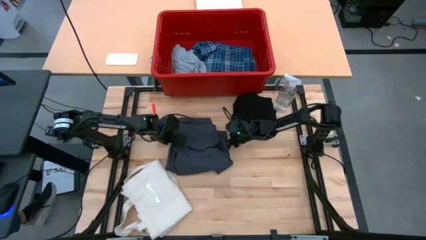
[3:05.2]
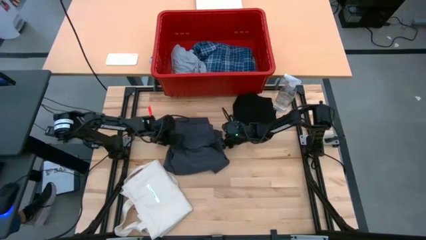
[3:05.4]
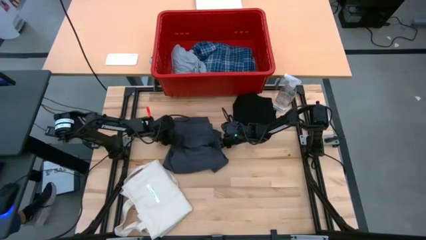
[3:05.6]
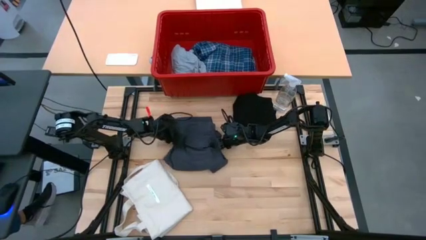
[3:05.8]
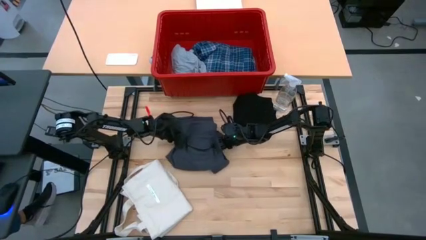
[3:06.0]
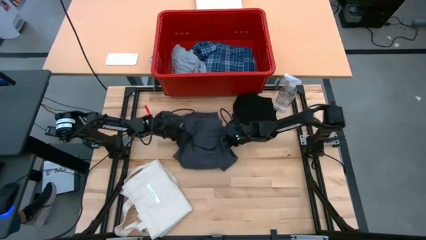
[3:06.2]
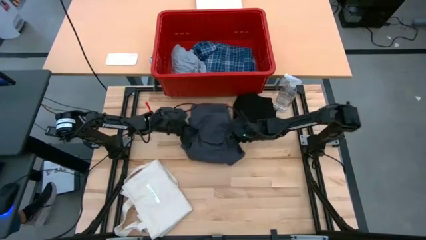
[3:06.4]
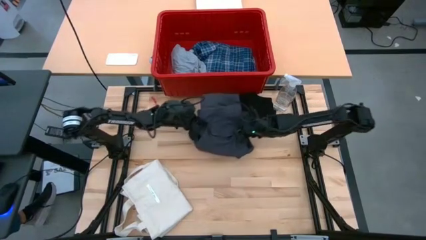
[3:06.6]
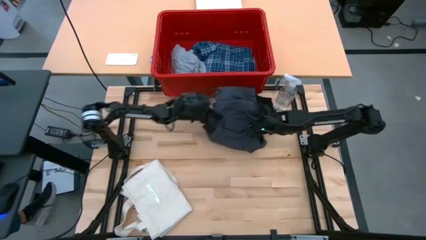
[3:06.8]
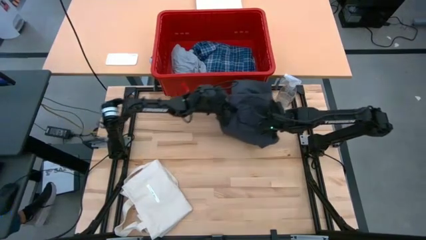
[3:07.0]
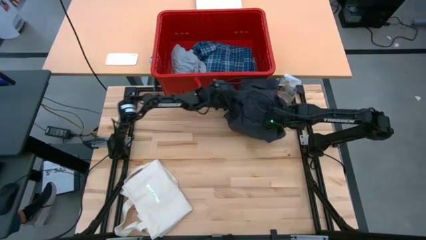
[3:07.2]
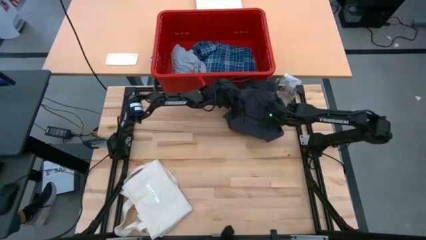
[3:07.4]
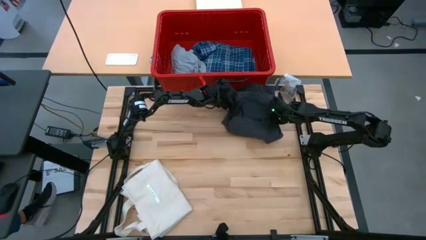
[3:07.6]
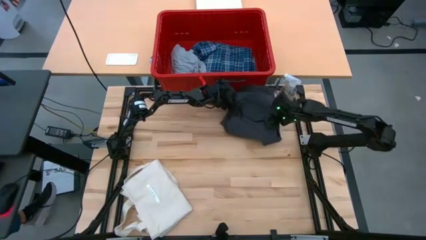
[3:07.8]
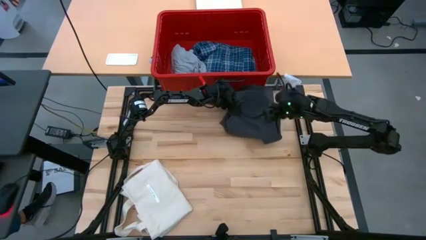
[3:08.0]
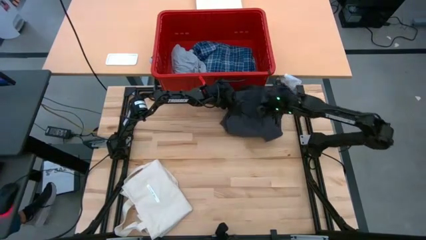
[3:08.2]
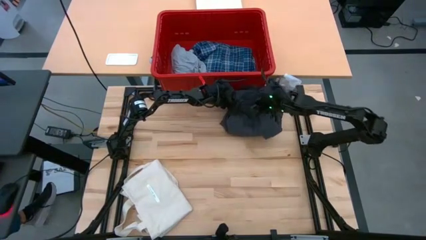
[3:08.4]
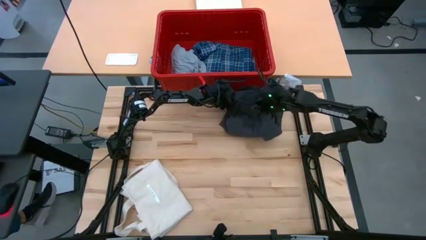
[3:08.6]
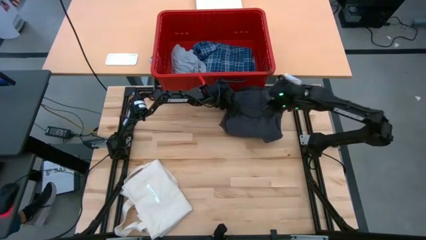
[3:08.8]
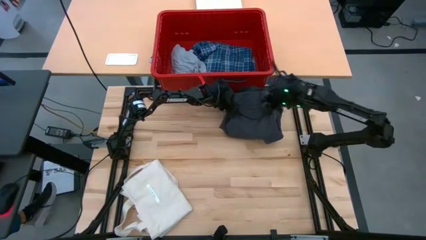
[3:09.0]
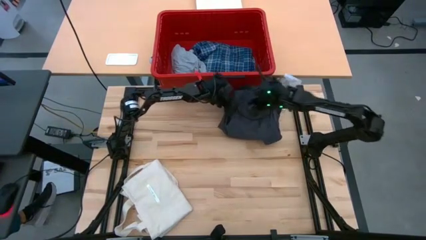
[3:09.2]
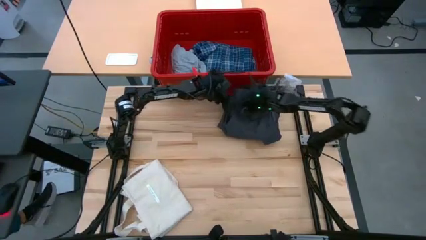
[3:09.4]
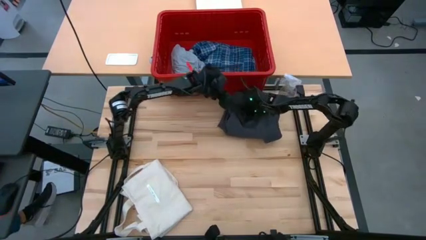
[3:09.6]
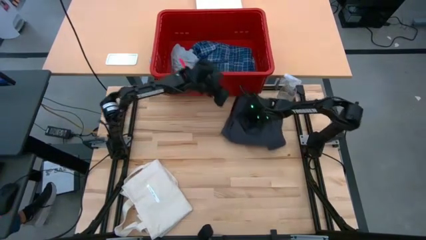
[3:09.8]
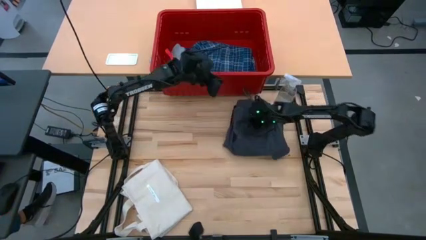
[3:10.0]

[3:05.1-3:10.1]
Task: Fold Laundry from Bin
Stack the folded gray shorts on top of the folded black shirt

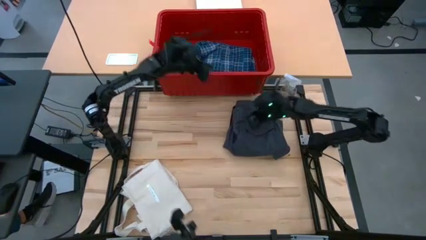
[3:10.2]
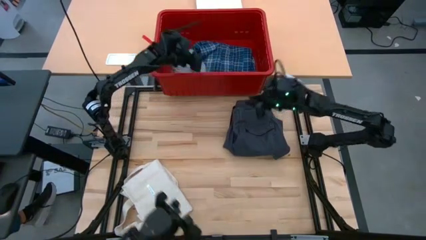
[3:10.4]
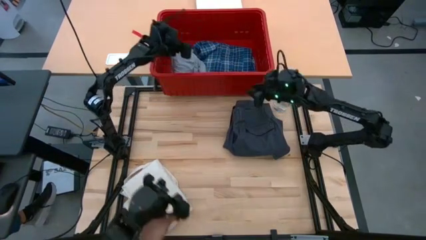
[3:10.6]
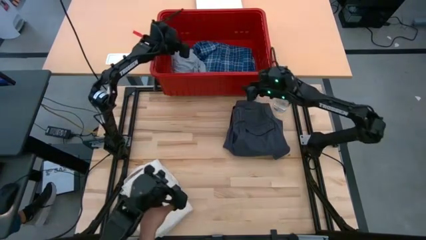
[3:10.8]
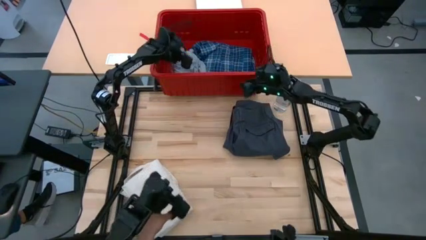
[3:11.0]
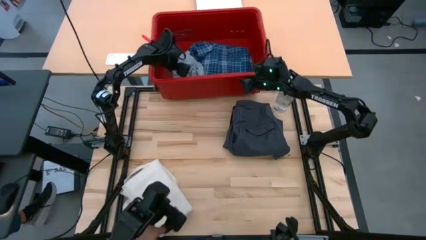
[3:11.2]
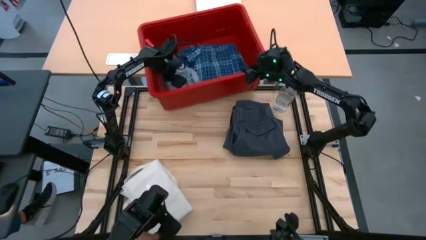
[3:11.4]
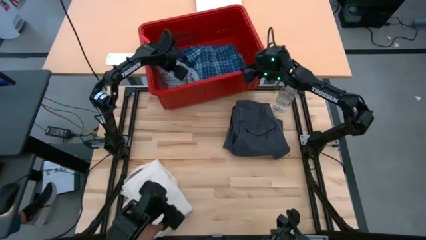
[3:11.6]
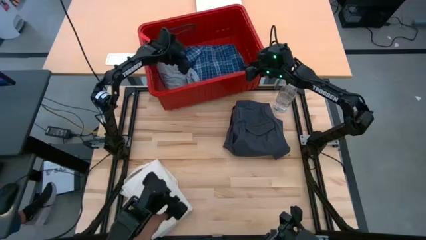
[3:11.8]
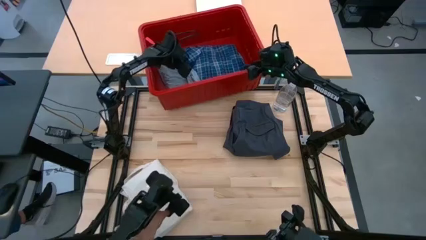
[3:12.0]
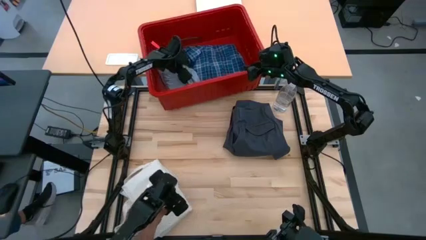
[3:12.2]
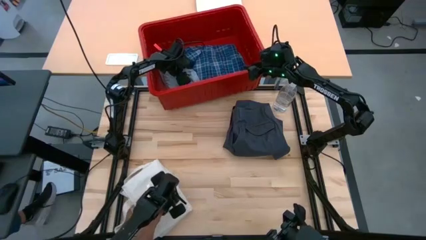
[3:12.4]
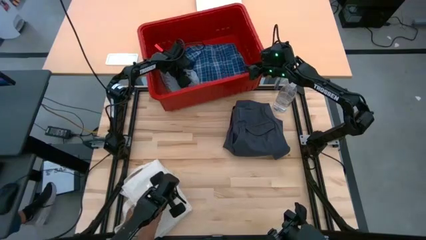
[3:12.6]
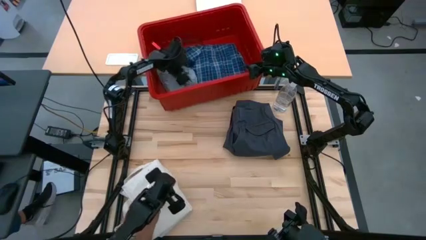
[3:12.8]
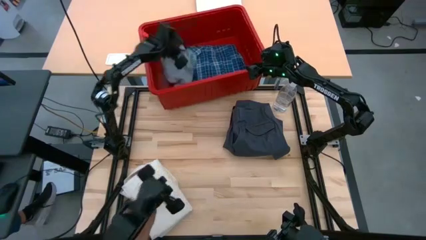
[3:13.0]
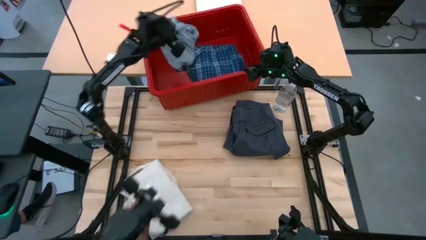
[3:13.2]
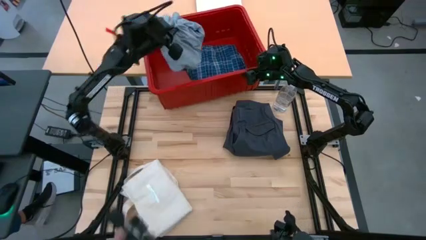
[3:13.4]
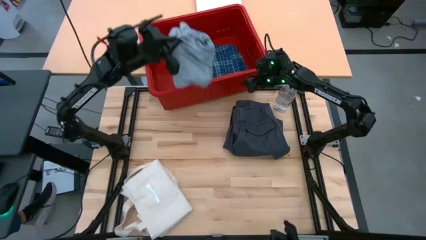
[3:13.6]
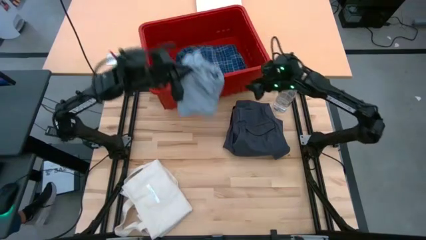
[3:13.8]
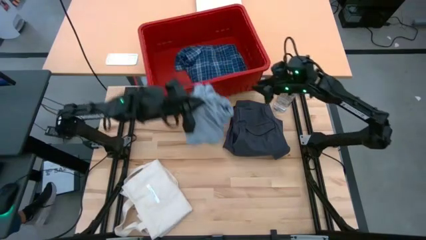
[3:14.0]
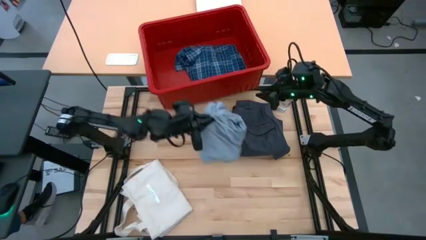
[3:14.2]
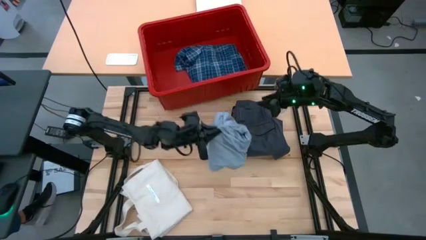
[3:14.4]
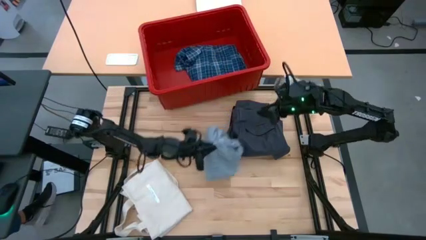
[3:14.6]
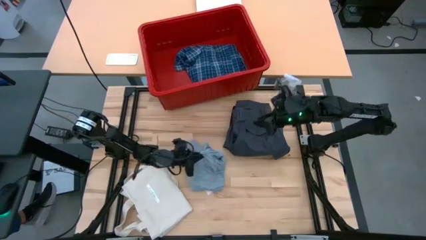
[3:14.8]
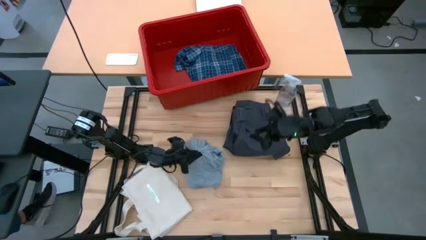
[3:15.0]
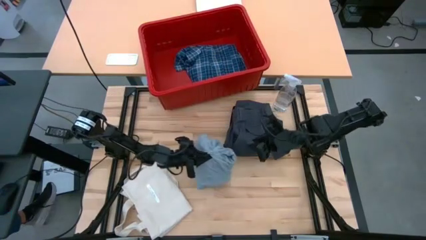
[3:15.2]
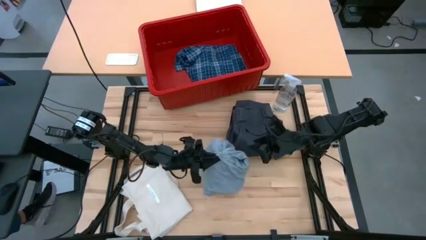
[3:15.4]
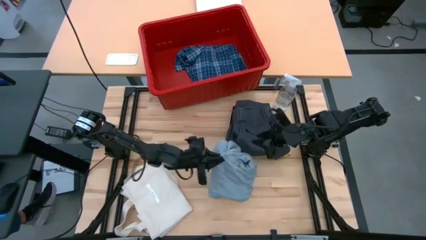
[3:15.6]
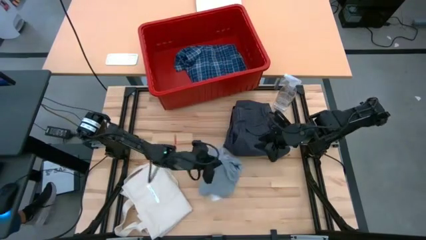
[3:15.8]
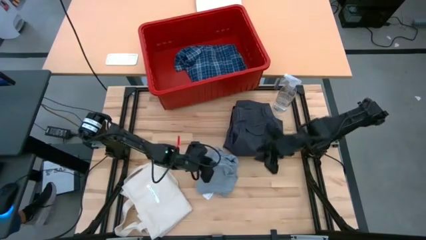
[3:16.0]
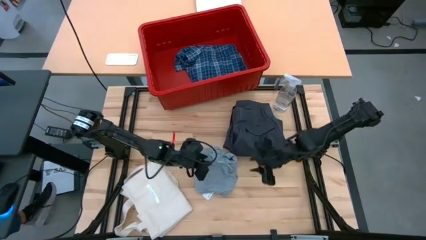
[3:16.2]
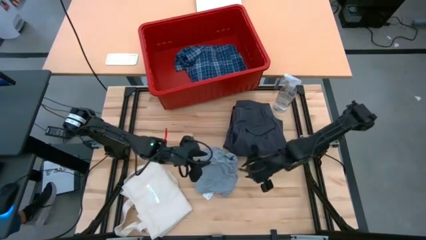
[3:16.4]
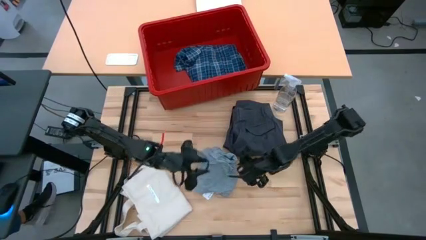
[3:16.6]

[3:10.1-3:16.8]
Remove the gray shirt from the red laundry bin

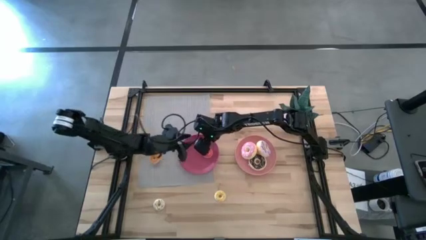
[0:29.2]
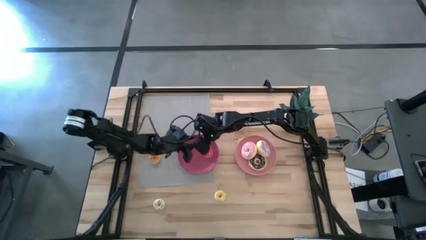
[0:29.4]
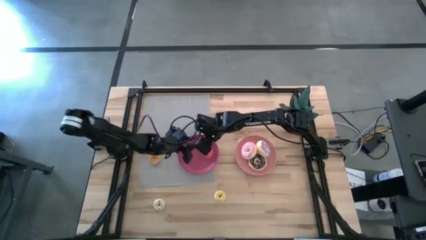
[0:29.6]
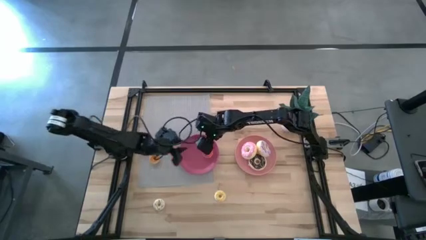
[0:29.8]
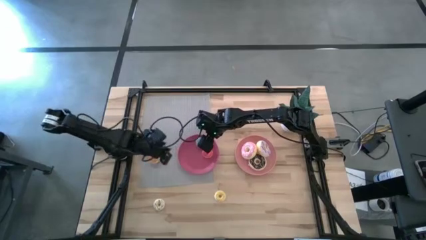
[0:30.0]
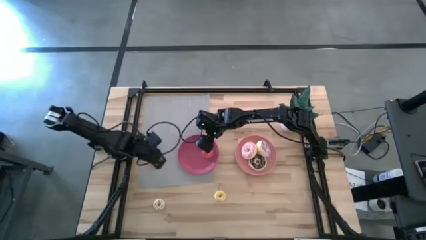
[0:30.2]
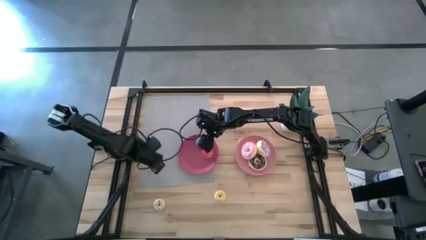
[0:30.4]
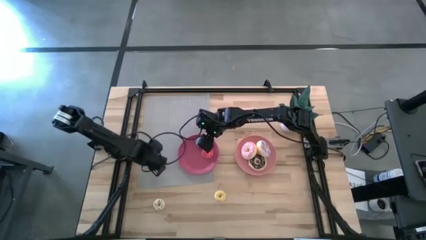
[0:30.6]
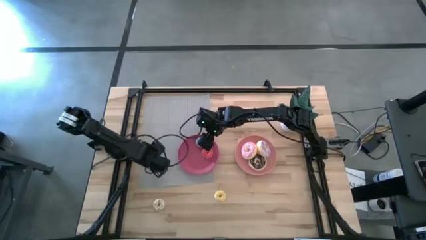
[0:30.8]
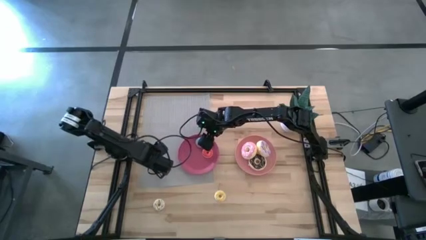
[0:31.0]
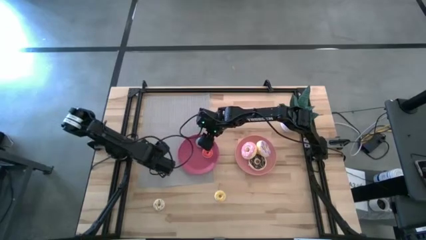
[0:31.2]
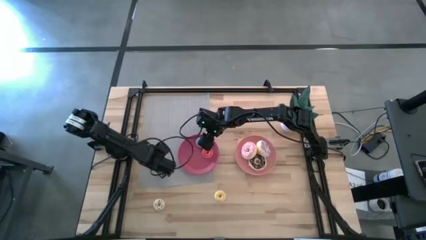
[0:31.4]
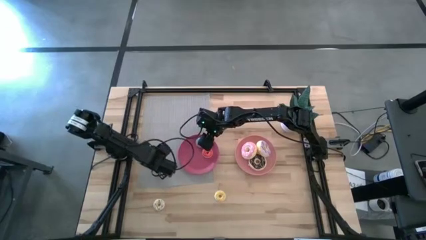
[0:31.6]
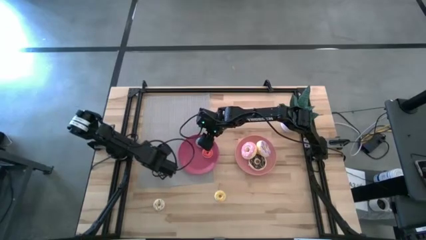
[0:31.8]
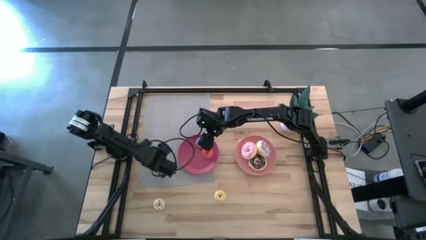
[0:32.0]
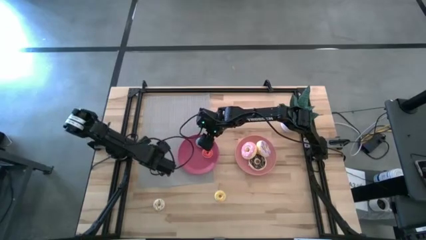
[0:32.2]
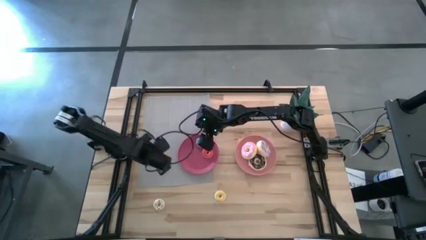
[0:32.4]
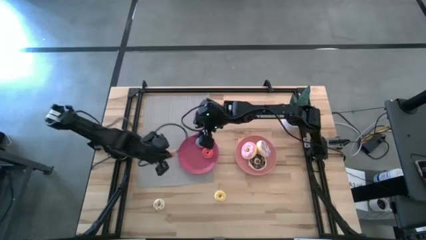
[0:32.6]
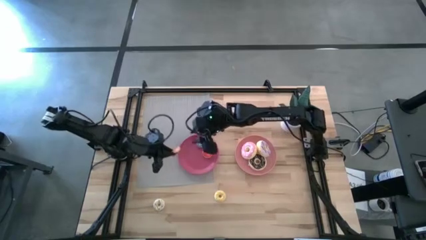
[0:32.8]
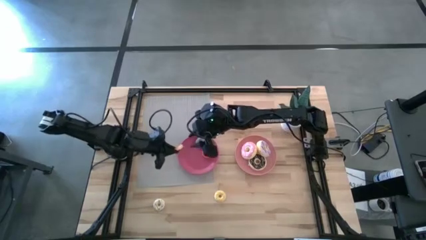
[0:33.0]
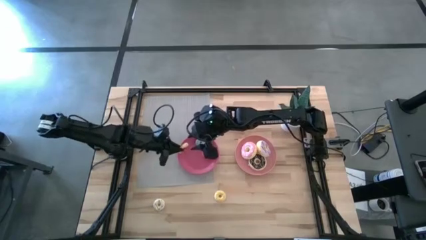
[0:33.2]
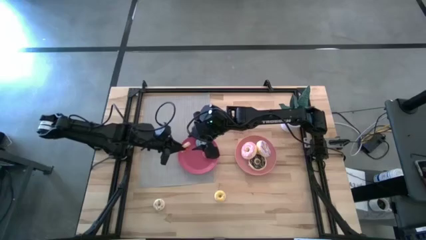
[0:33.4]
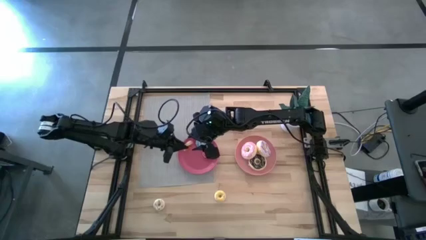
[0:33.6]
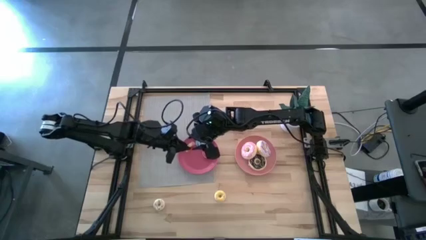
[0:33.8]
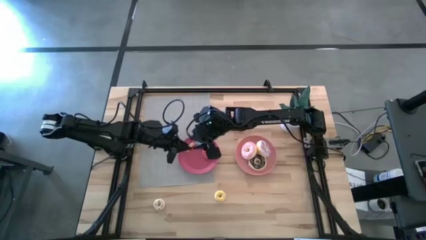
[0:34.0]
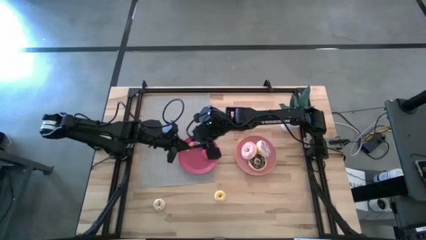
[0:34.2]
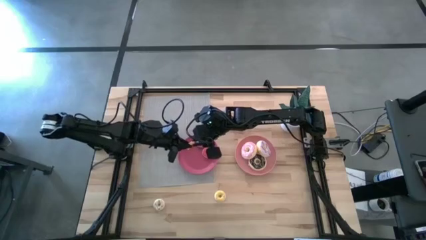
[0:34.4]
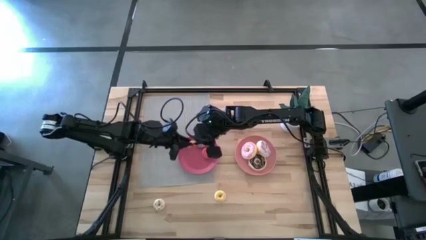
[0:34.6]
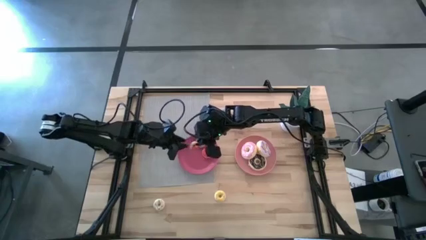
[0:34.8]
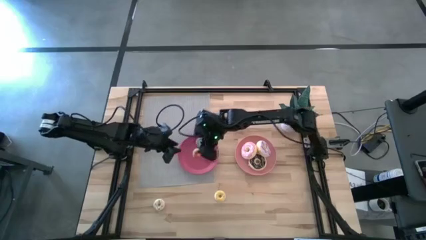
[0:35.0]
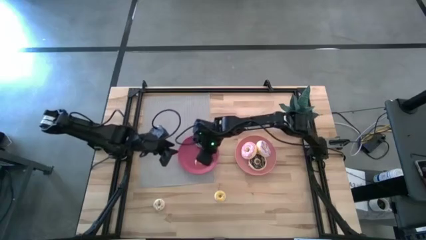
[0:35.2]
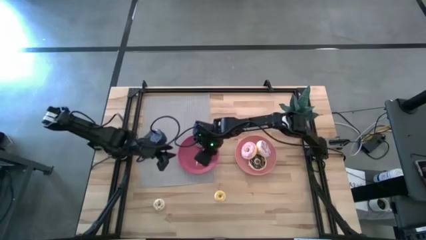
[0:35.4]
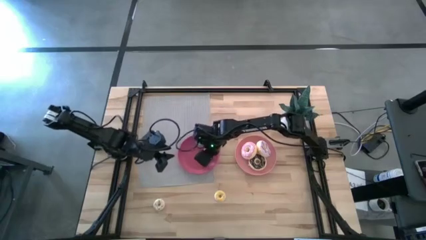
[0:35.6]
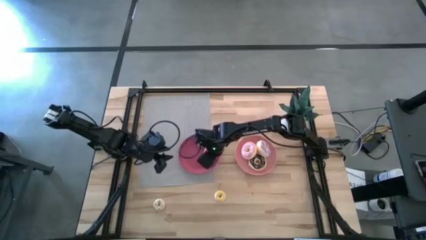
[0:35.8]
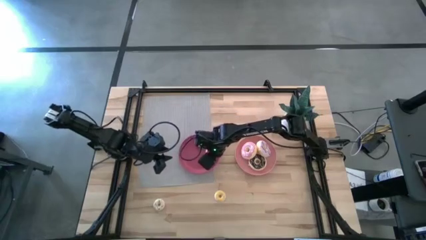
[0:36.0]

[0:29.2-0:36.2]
Task: Pick & Place donuts
Put the small orange doughnut into the pink plate
